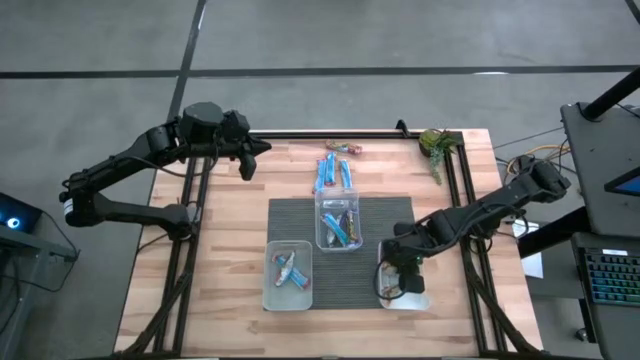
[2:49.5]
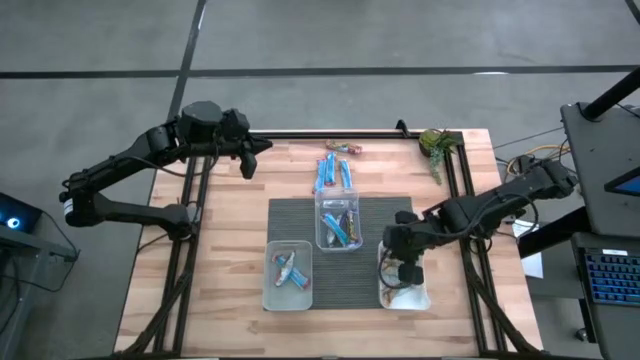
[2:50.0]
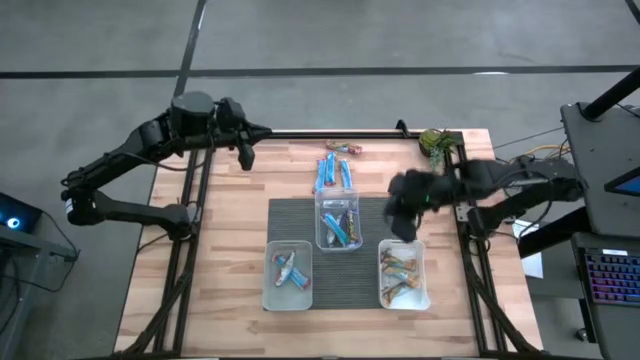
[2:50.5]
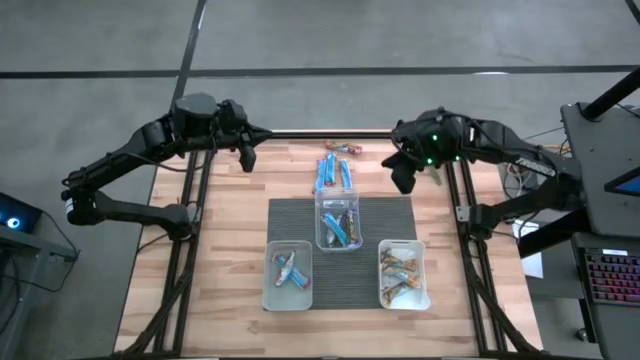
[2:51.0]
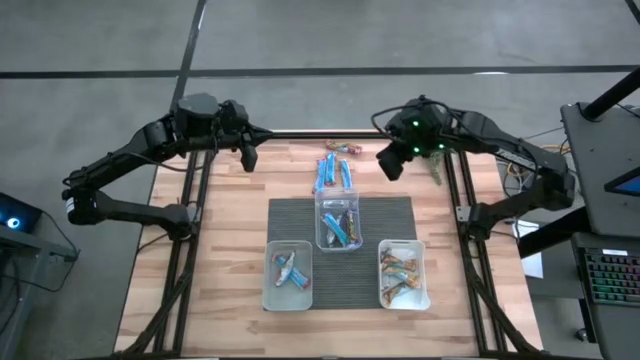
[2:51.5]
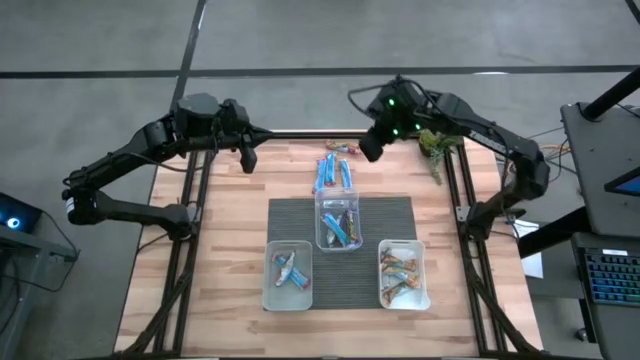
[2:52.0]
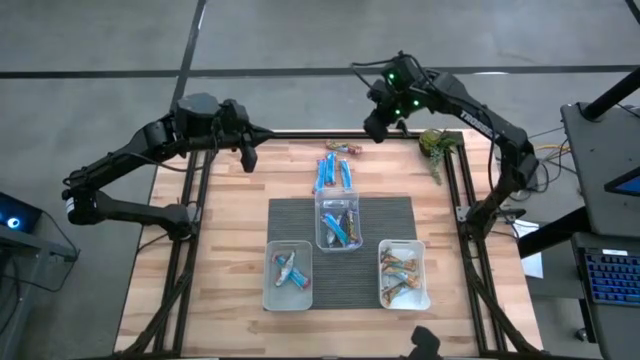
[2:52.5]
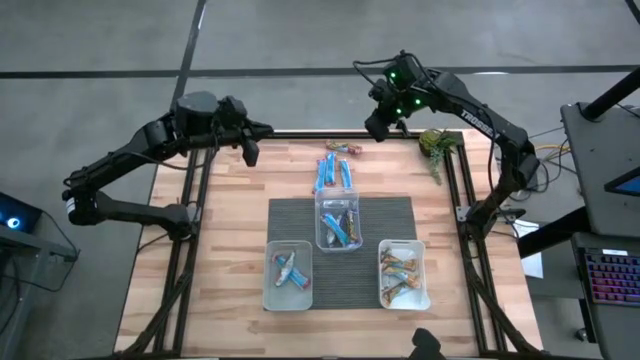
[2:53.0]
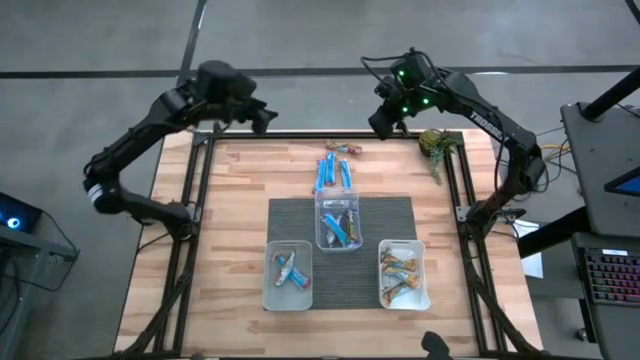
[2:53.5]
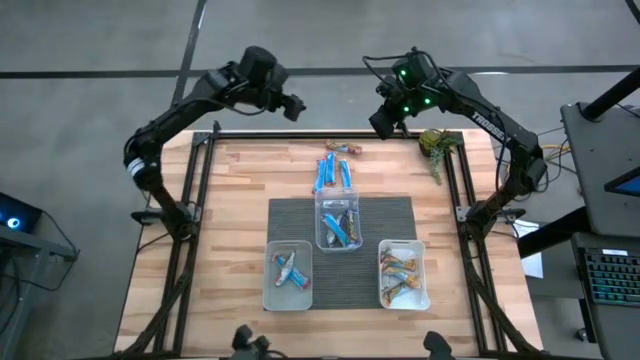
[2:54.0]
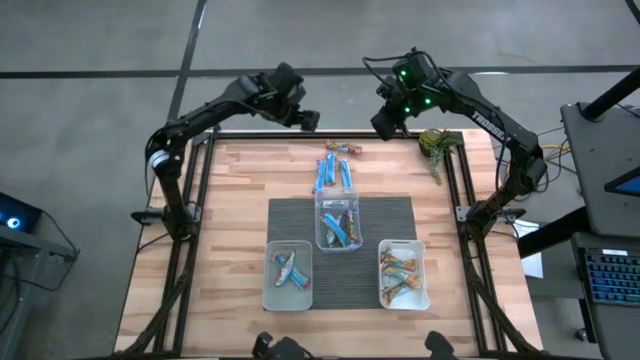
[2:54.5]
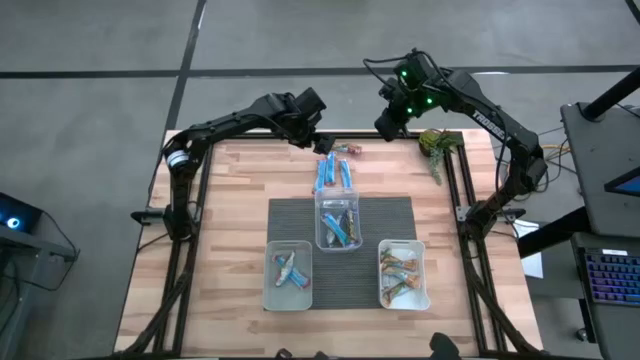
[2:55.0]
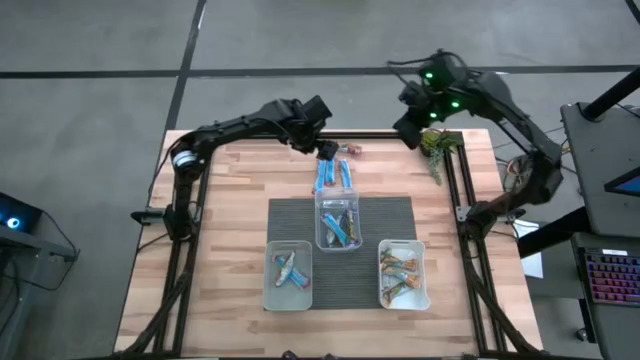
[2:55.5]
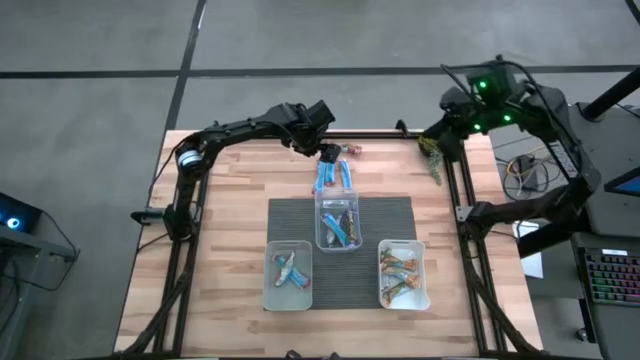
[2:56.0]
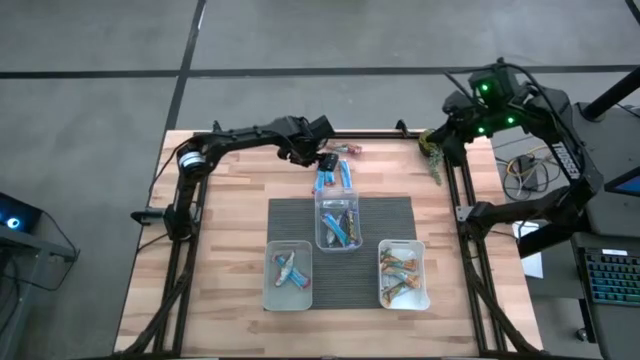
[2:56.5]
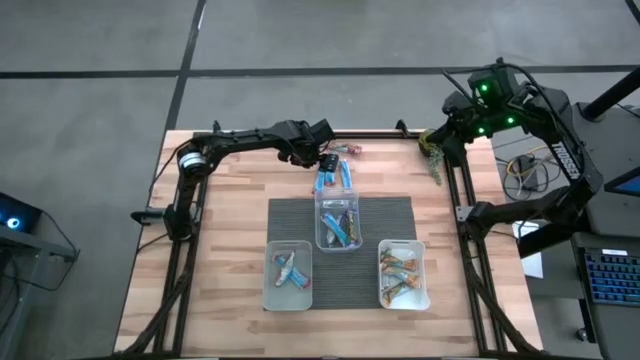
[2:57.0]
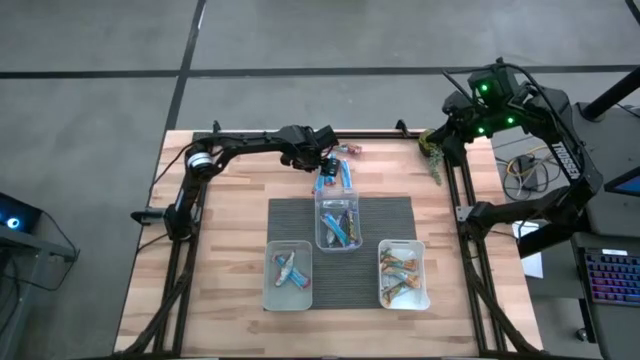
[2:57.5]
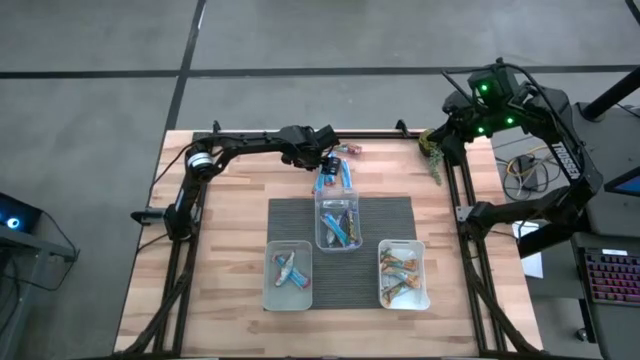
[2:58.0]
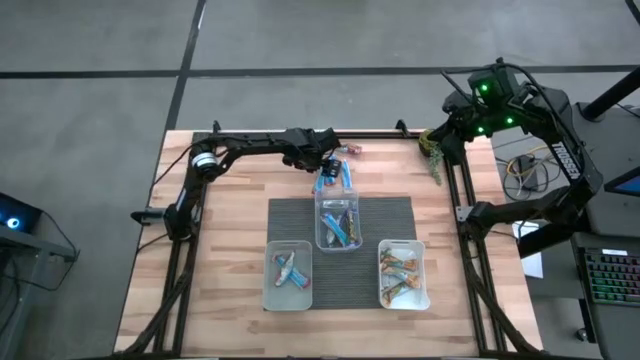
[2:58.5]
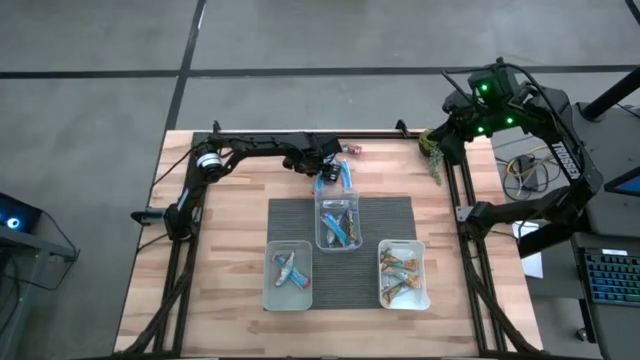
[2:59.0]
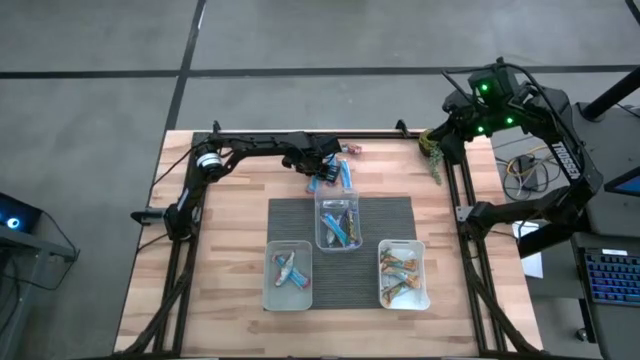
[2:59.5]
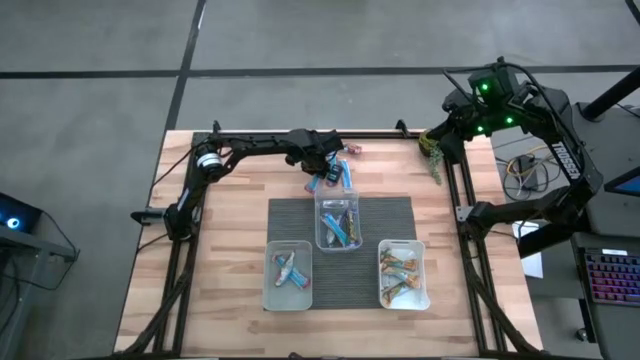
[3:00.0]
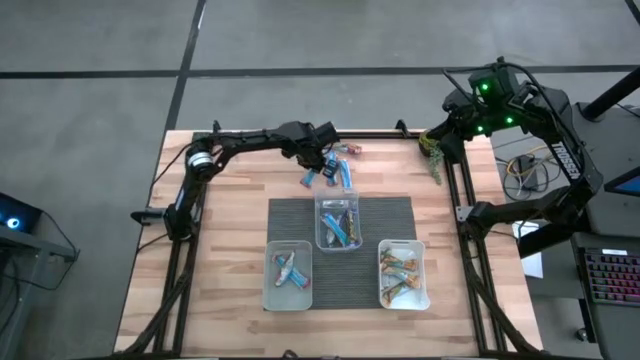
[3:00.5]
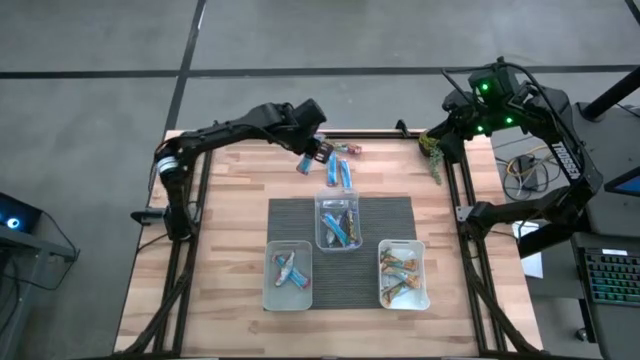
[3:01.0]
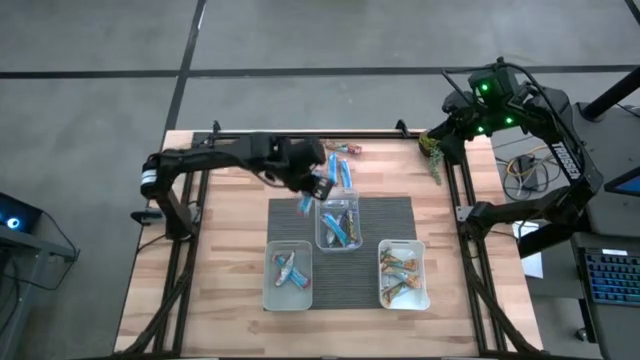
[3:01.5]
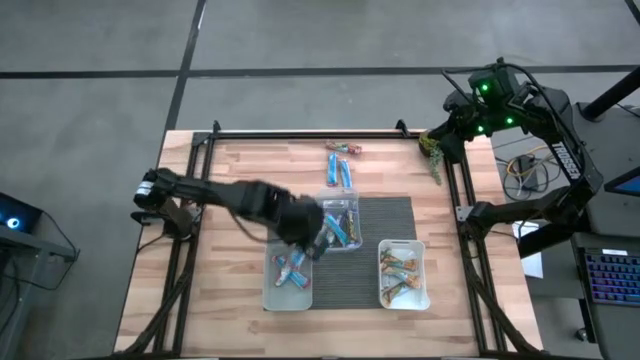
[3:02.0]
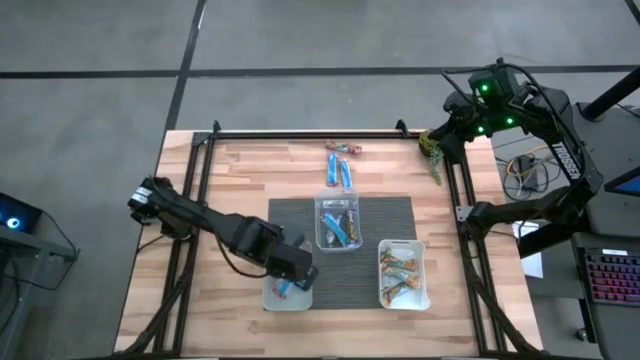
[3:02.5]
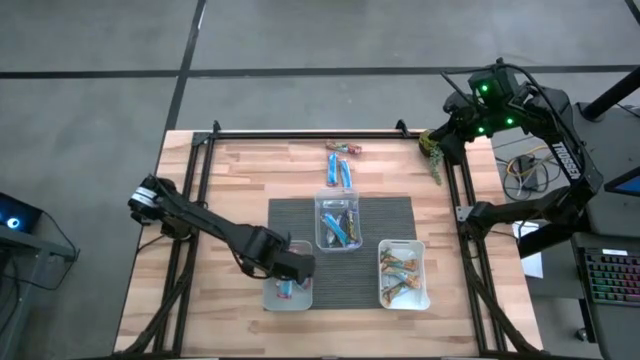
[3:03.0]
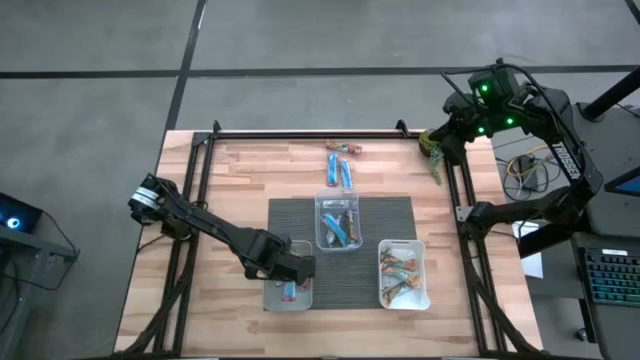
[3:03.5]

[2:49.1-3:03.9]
Task: Pick and place Granola Bars by type
Put the red granola bar into the gray bin

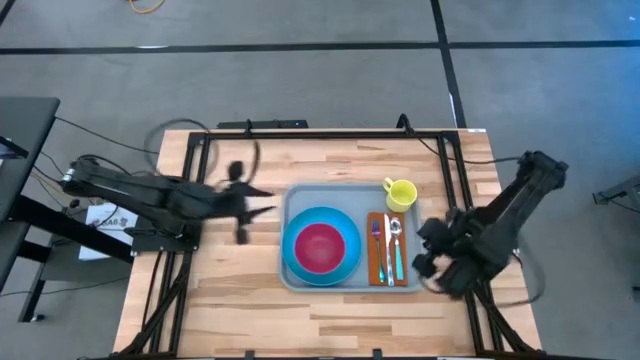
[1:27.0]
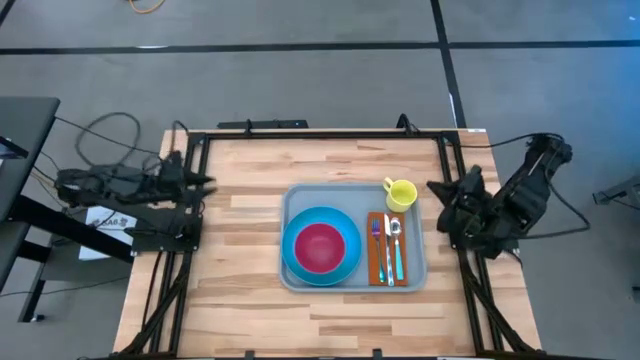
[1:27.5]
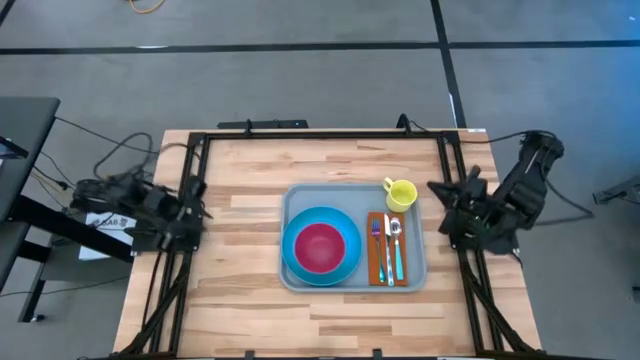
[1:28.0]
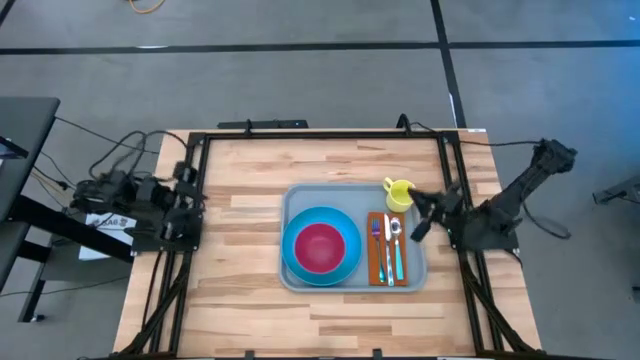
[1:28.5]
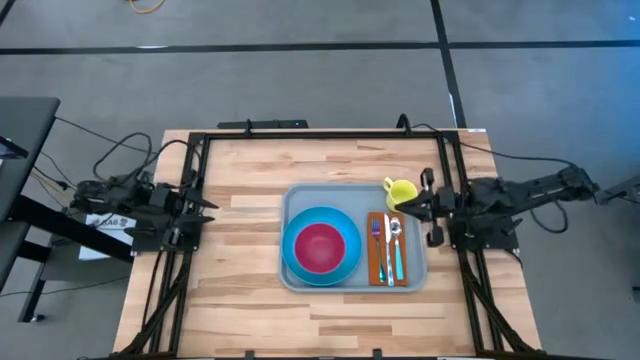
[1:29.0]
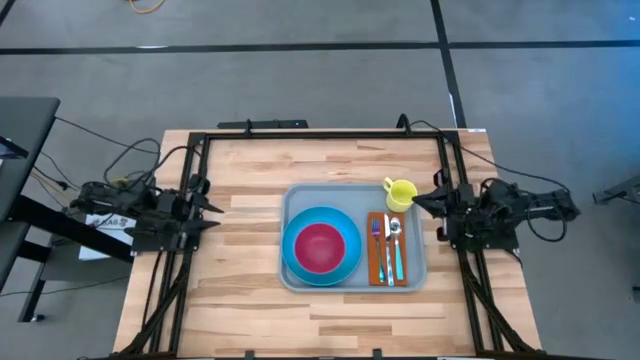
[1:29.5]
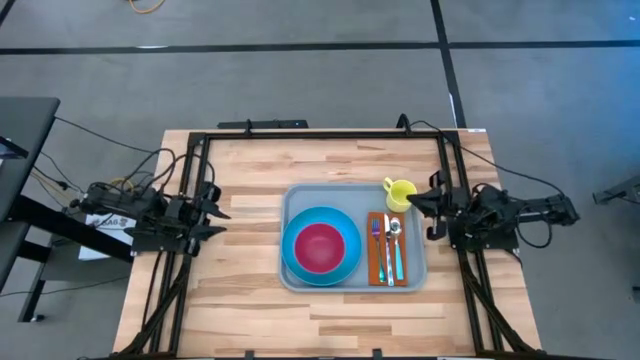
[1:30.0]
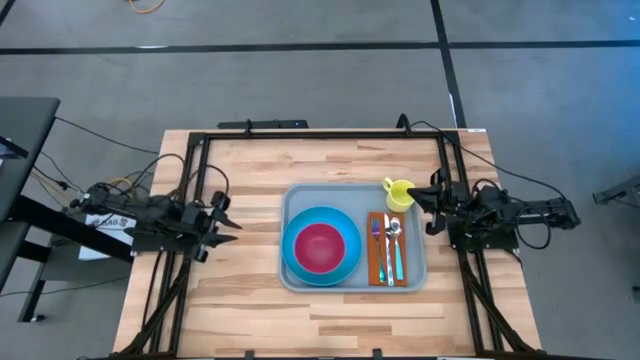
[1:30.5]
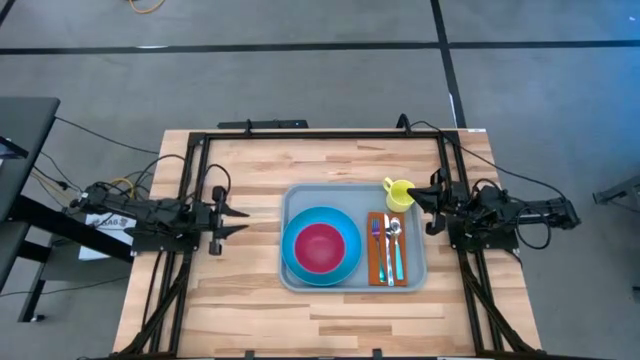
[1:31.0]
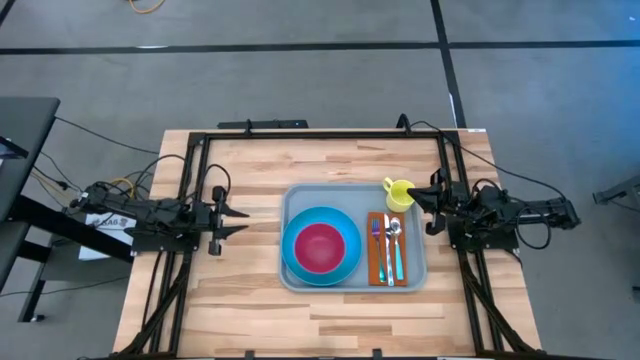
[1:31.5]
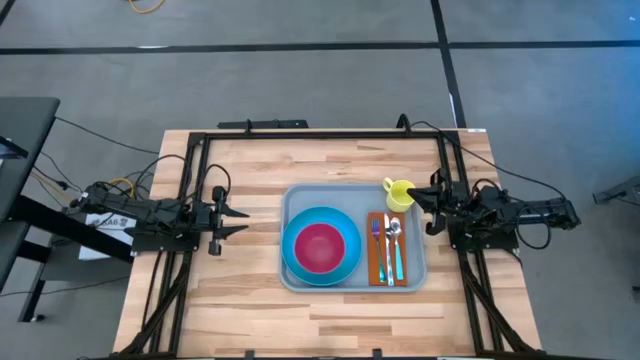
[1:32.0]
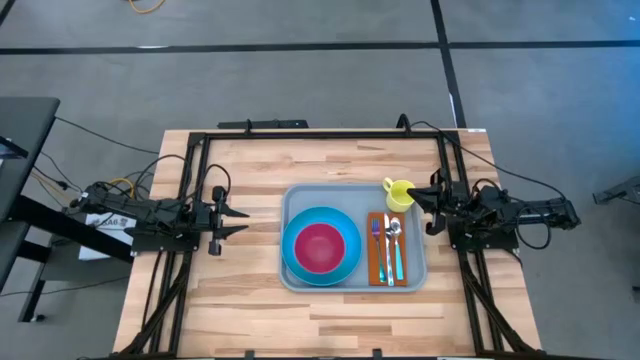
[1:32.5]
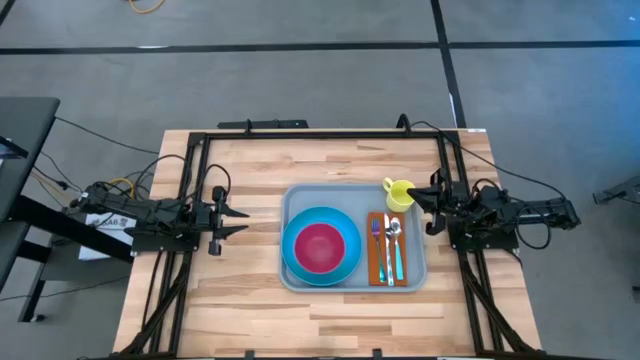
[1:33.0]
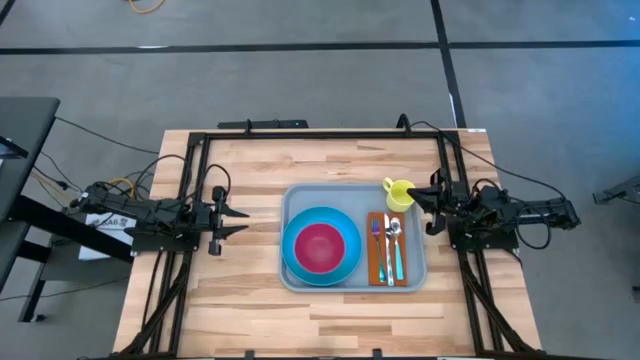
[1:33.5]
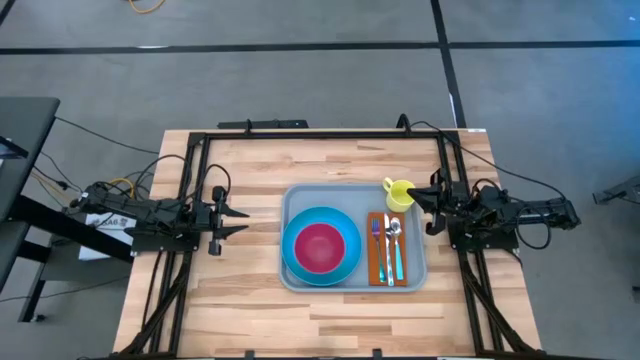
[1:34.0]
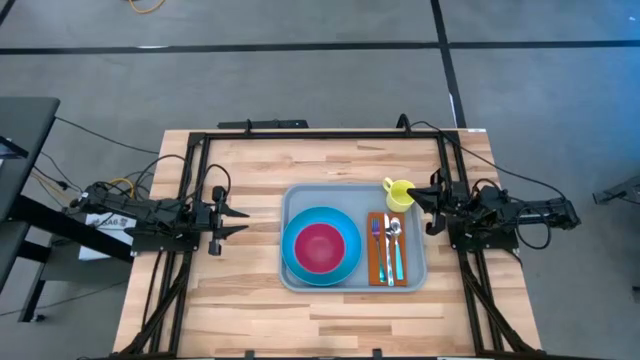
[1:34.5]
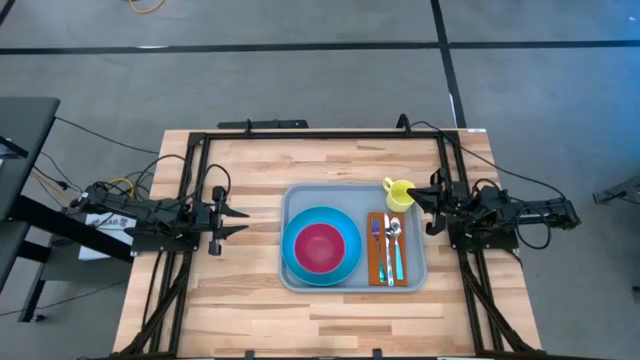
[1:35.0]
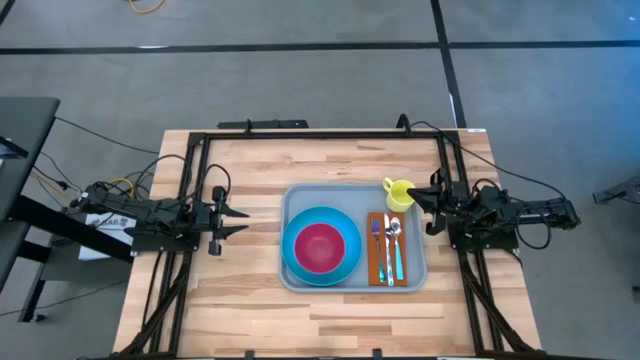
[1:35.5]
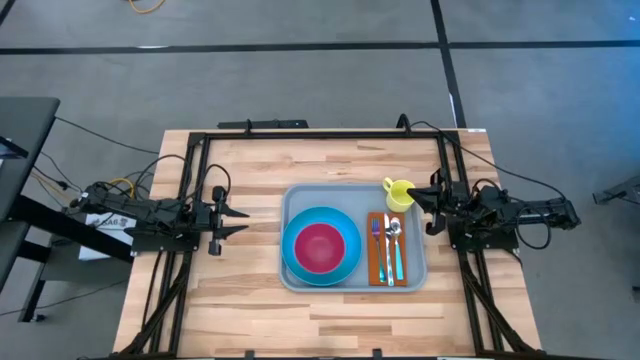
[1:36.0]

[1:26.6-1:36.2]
Task: Set up tray
Return to Home Position
